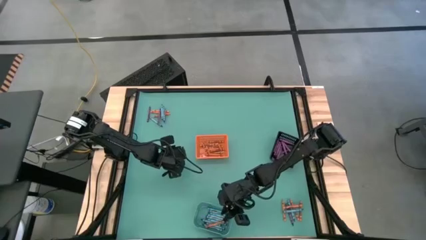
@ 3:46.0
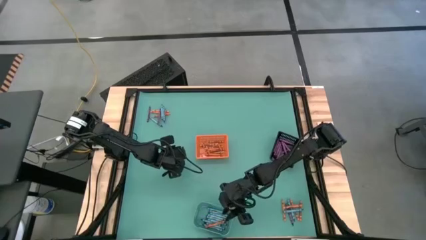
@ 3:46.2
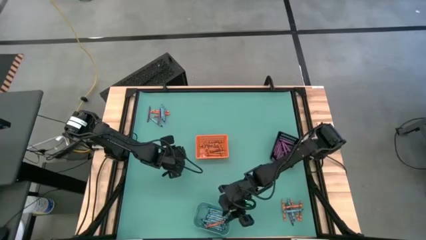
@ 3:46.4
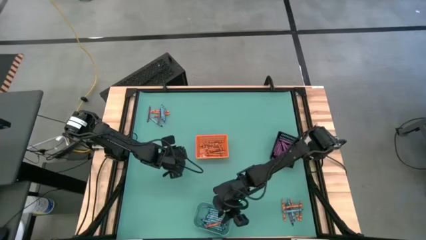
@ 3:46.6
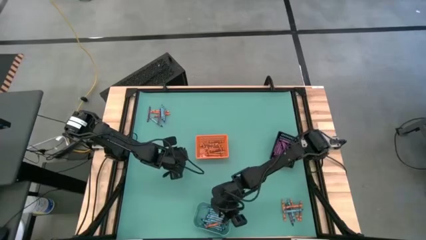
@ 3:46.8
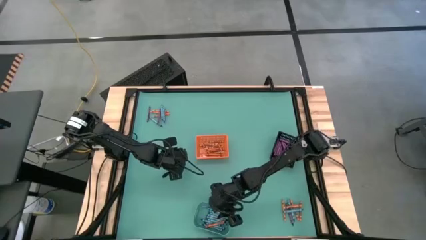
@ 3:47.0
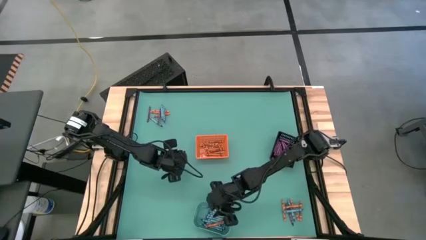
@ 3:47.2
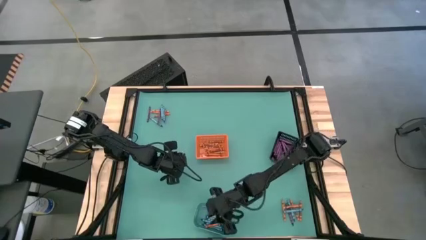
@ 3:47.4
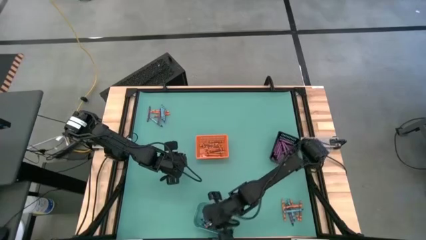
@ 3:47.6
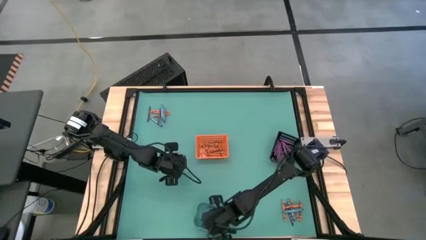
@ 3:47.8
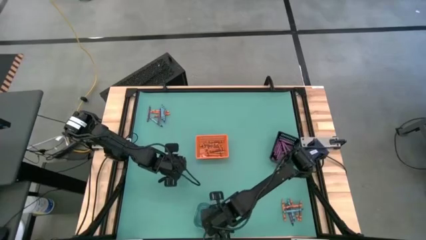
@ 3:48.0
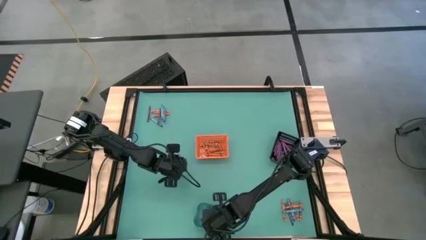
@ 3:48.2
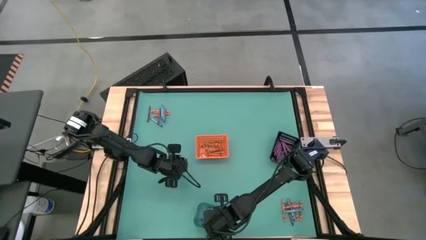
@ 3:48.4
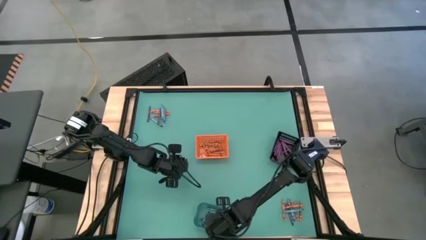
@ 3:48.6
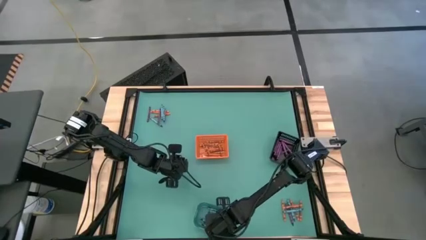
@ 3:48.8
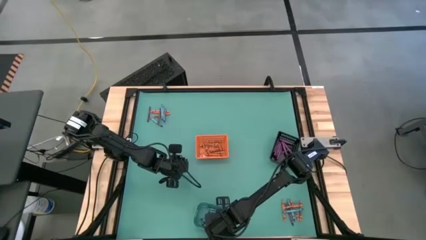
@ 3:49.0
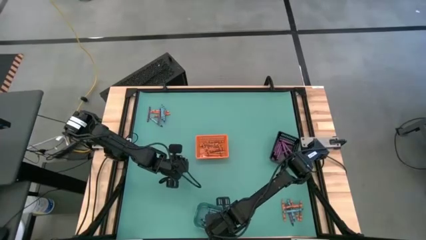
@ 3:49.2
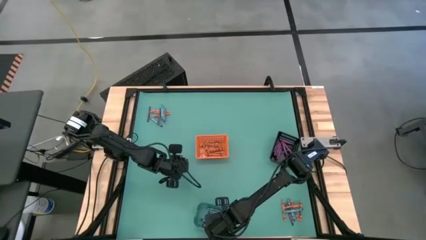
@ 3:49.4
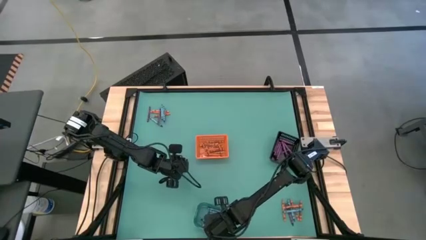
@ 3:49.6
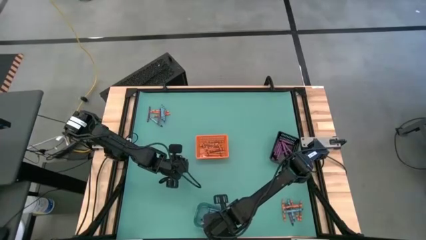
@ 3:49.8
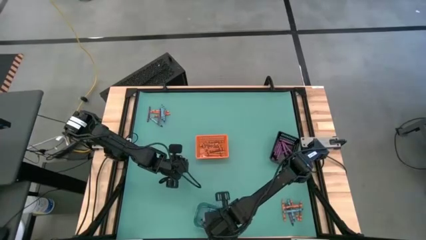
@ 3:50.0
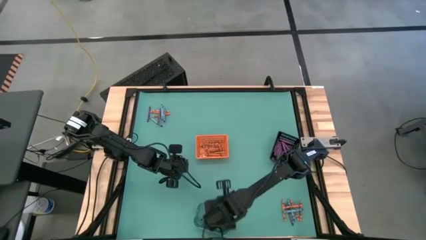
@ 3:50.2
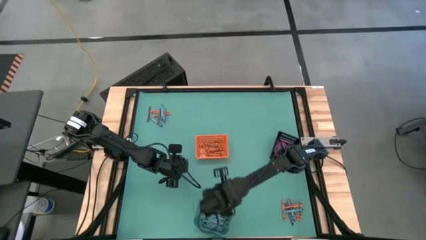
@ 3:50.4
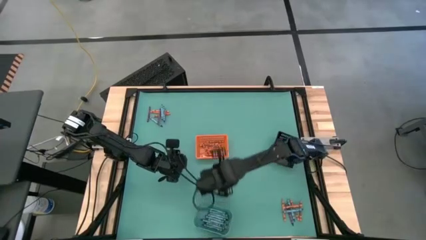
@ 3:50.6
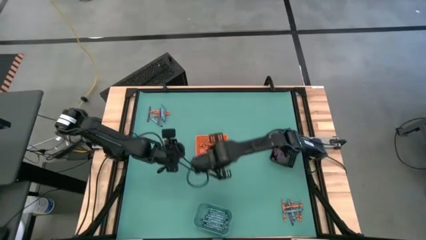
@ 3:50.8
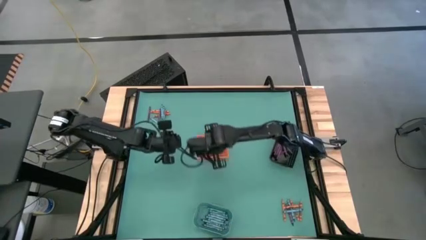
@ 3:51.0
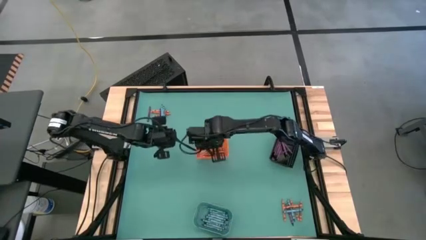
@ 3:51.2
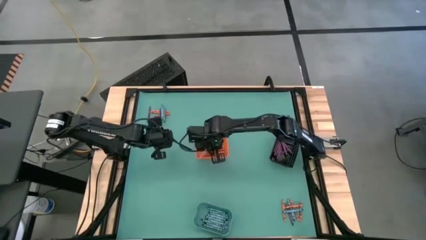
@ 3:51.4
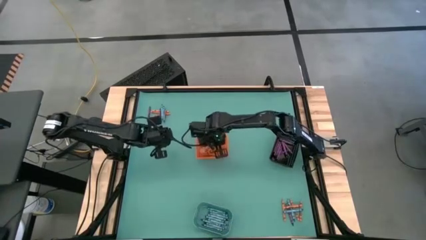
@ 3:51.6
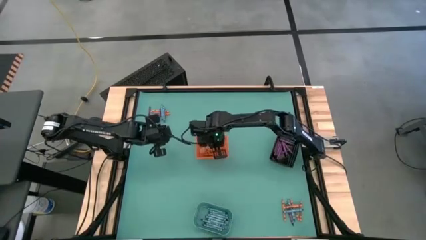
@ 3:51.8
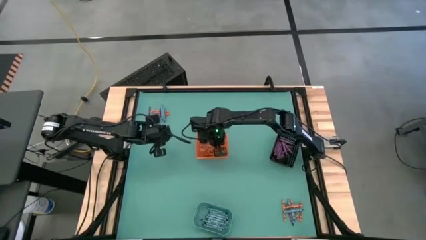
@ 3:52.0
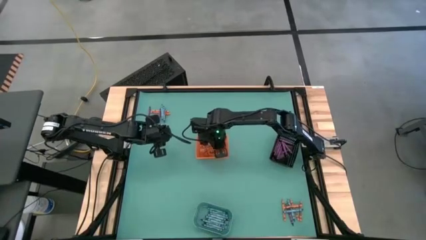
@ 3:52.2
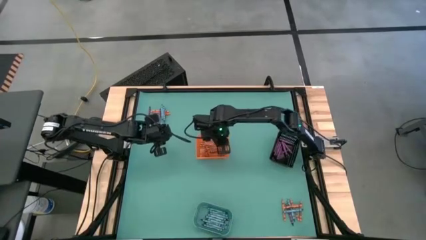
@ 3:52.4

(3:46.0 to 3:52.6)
Task: Sort crayons
Put the orange crayon into the orange bin

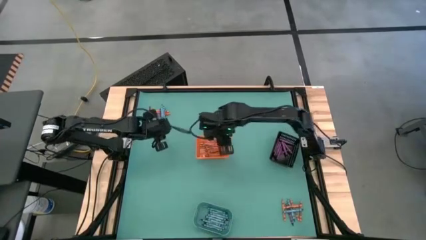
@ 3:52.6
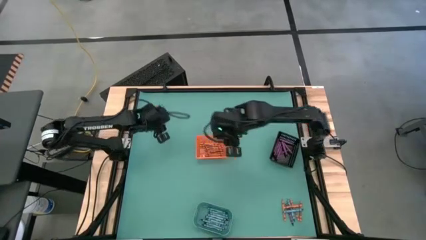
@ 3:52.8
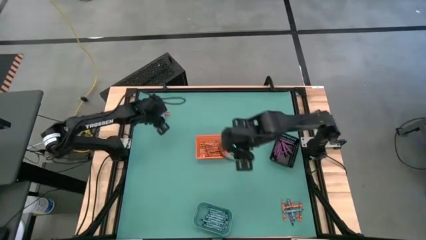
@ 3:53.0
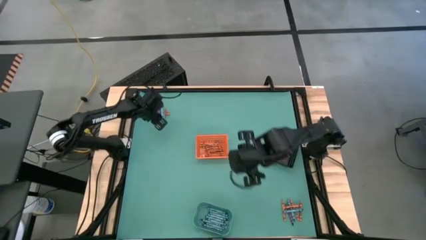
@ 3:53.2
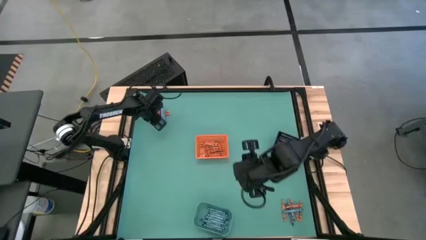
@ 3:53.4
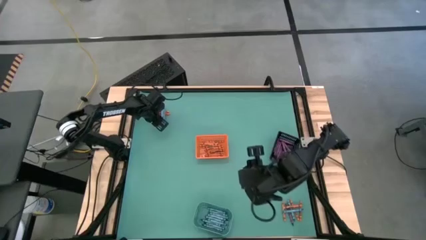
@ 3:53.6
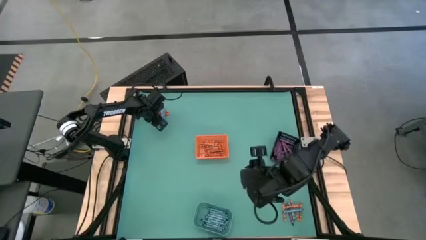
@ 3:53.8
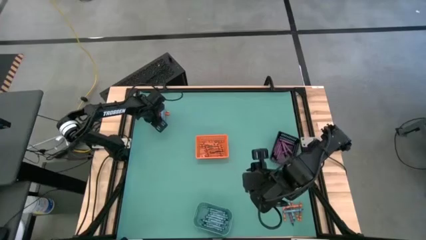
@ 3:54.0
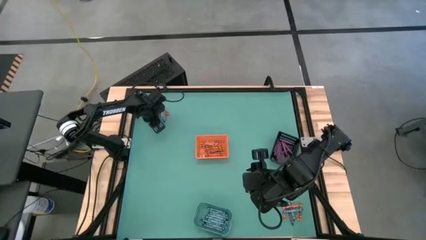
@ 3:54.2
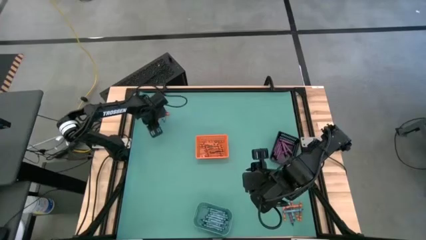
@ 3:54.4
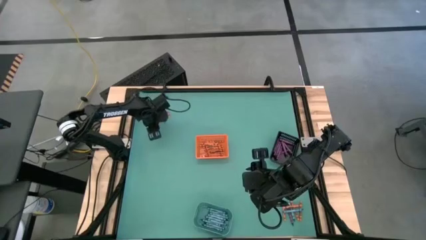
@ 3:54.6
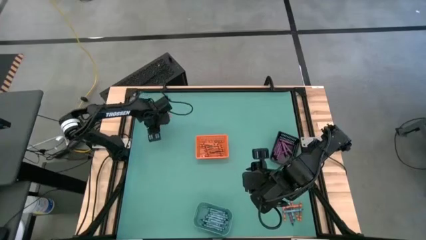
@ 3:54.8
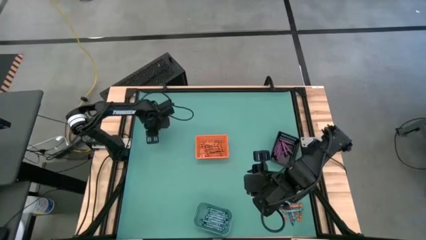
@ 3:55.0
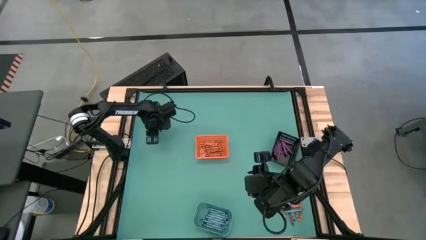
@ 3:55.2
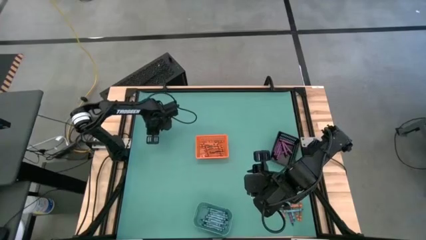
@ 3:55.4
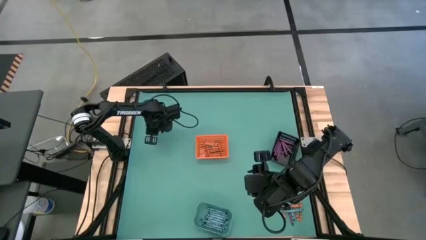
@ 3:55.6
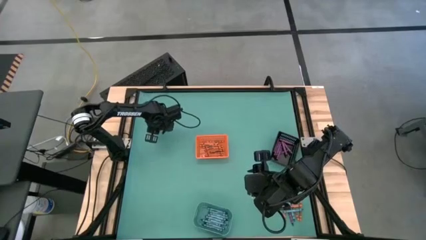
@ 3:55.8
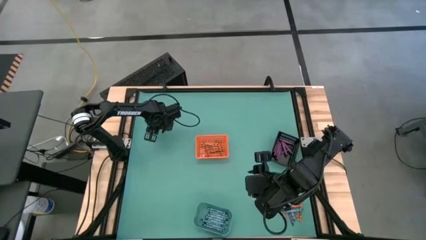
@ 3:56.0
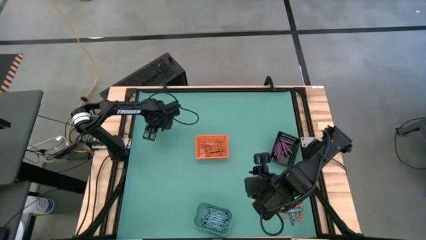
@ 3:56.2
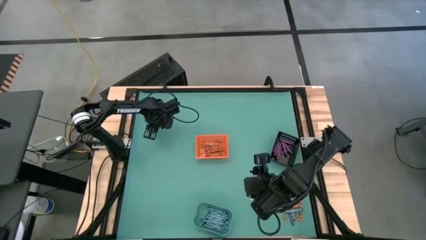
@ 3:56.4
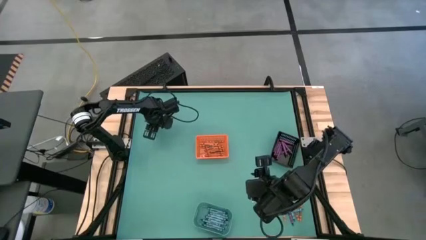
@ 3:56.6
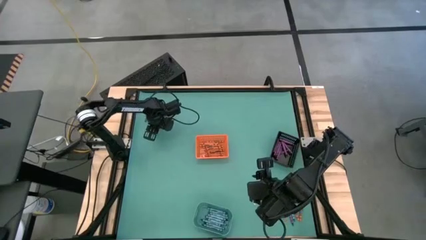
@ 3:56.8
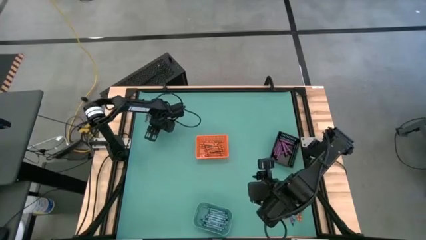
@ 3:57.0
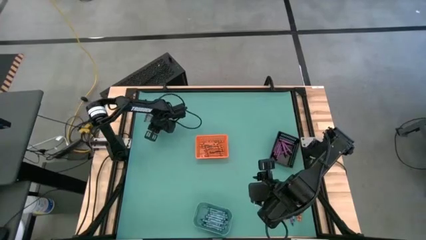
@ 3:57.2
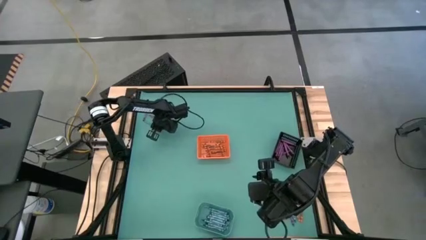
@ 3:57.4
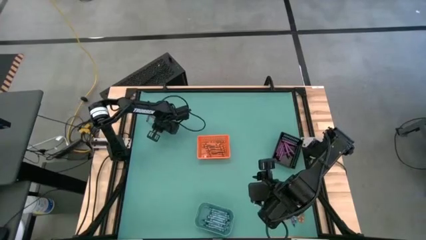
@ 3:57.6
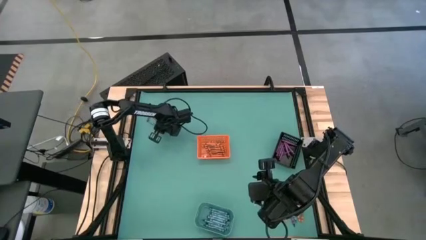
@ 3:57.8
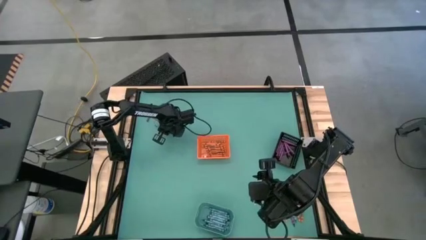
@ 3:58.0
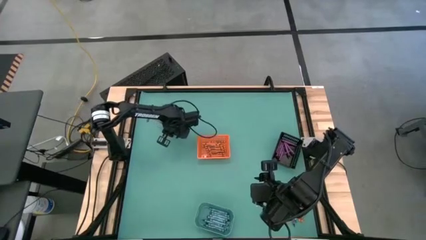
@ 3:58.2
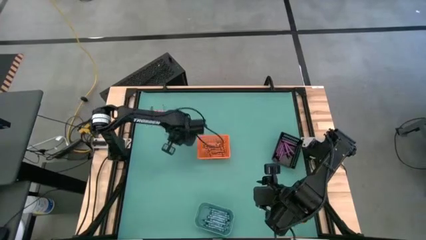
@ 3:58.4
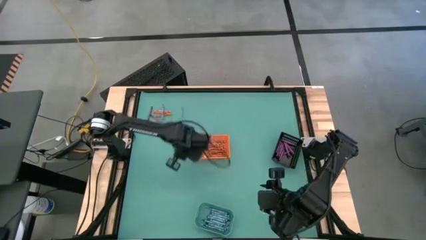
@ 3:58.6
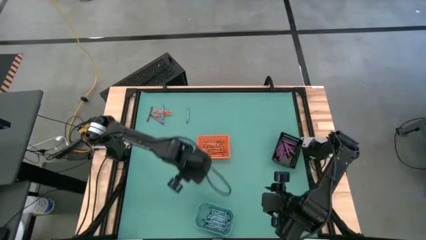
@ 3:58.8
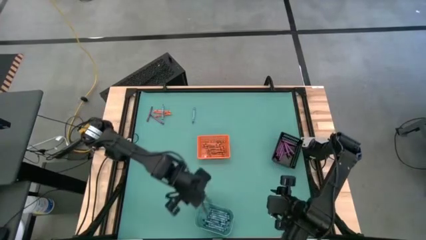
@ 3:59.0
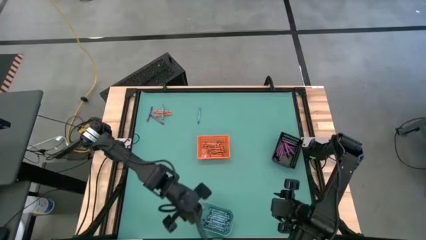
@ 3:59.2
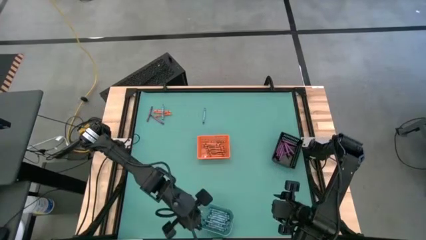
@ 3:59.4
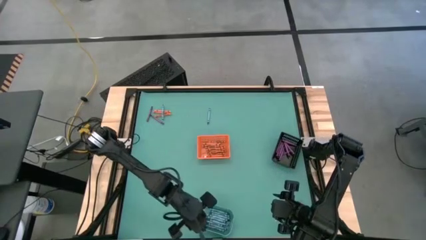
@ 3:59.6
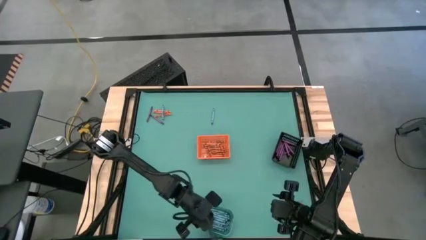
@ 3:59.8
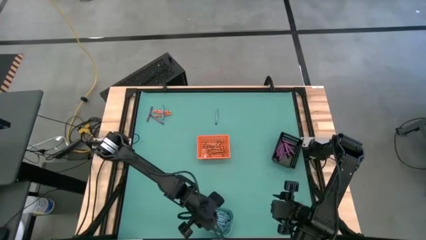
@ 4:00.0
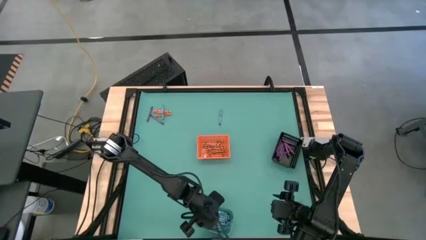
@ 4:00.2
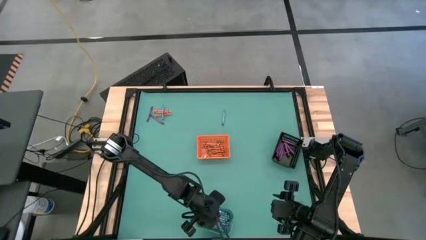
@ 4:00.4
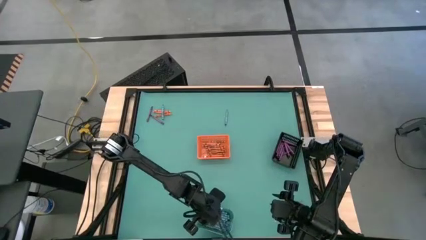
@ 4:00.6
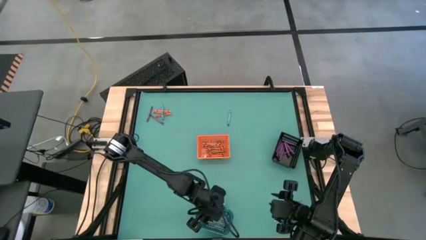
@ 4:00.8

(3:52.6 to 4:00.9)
Put the blue crayon into the blue bin
